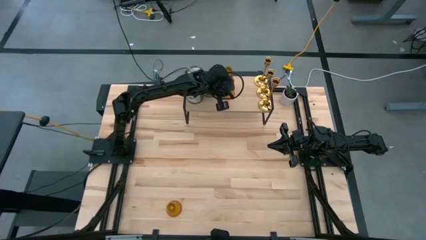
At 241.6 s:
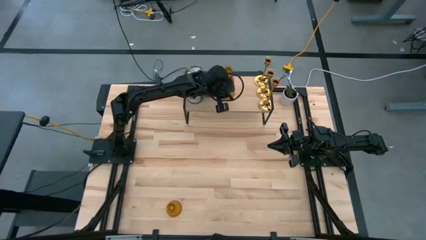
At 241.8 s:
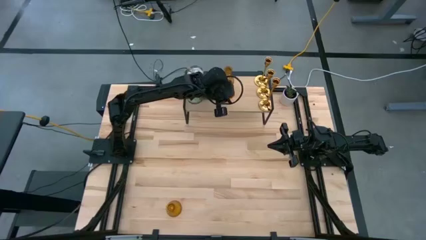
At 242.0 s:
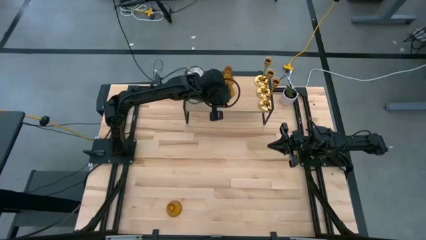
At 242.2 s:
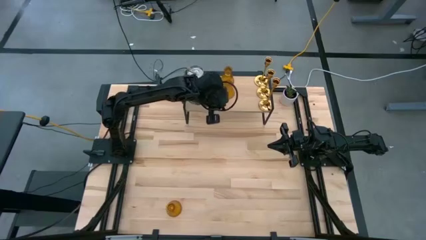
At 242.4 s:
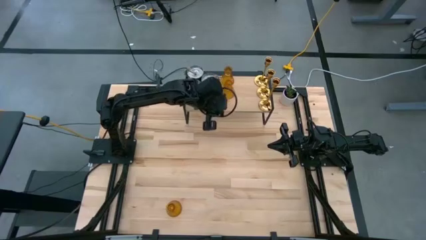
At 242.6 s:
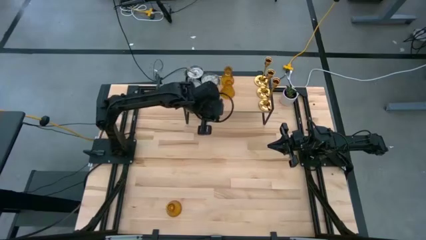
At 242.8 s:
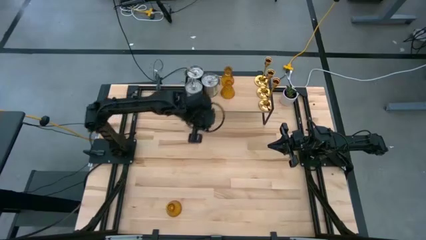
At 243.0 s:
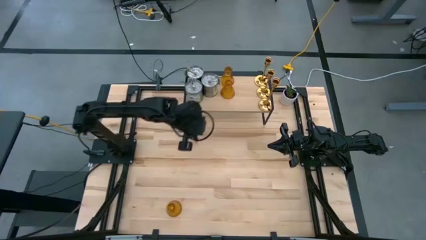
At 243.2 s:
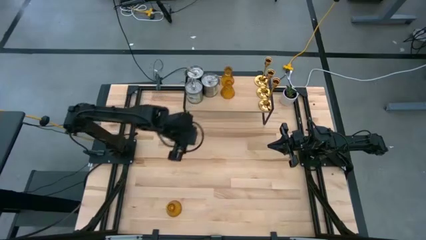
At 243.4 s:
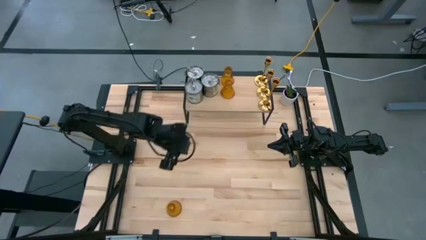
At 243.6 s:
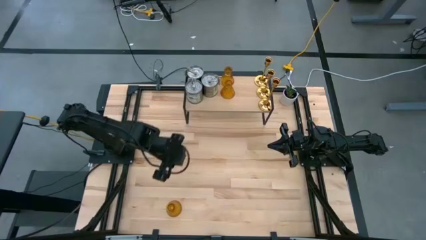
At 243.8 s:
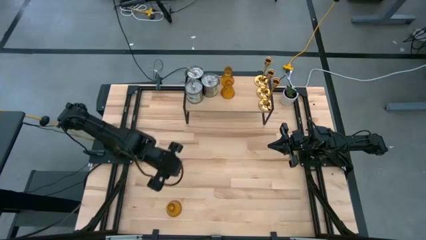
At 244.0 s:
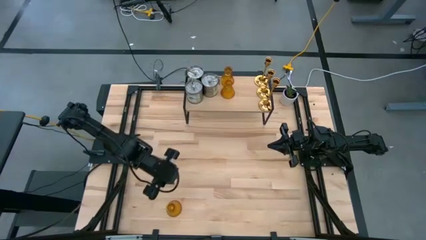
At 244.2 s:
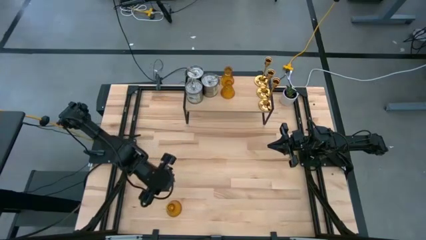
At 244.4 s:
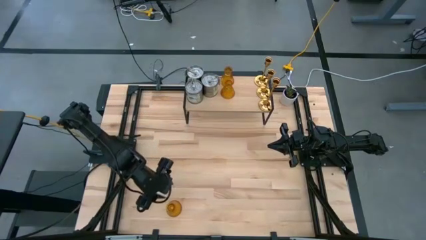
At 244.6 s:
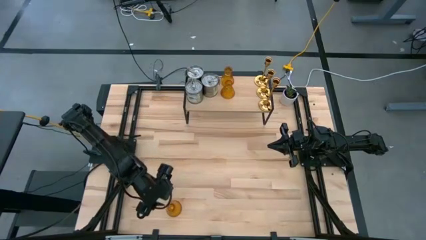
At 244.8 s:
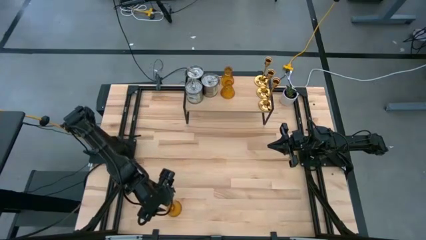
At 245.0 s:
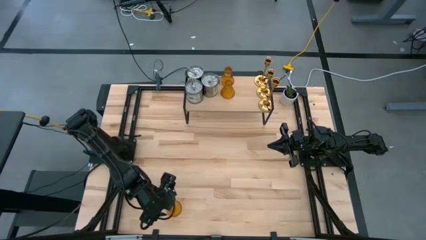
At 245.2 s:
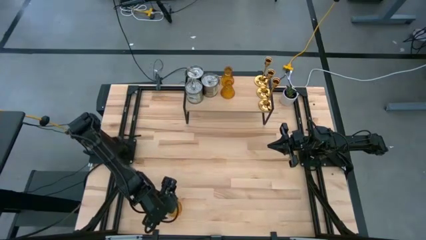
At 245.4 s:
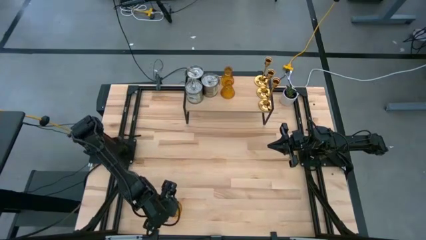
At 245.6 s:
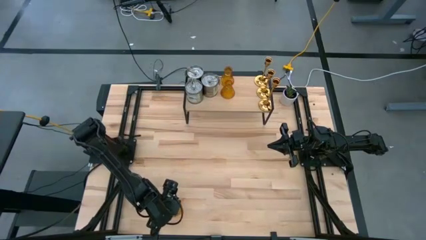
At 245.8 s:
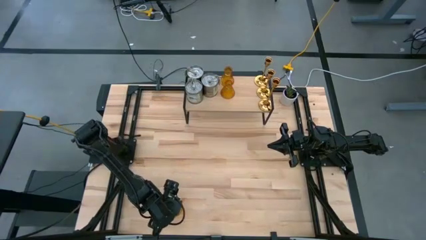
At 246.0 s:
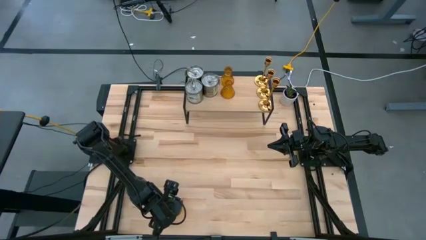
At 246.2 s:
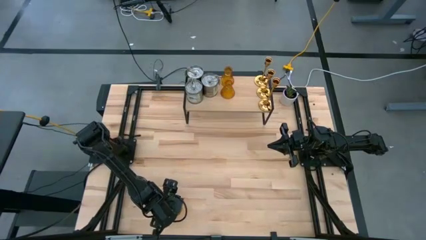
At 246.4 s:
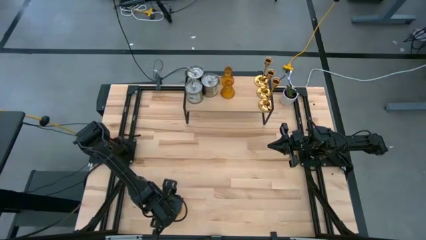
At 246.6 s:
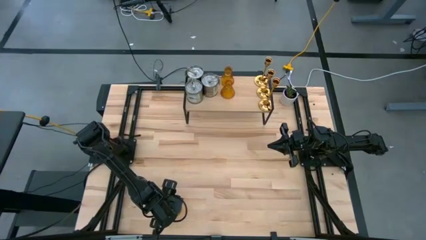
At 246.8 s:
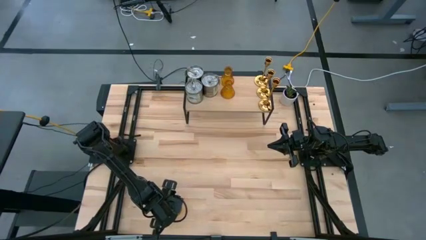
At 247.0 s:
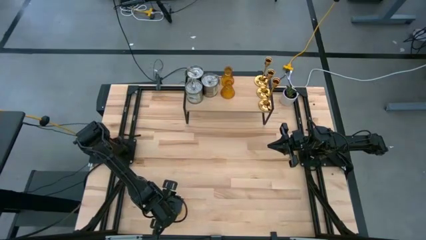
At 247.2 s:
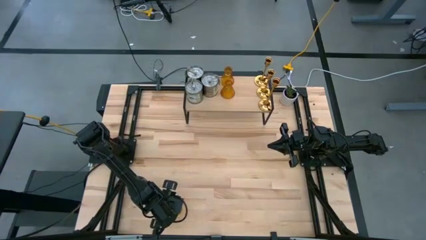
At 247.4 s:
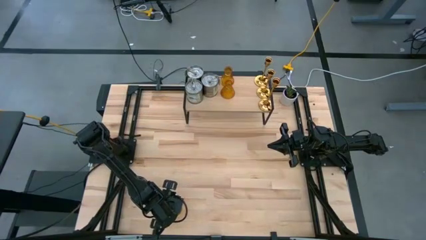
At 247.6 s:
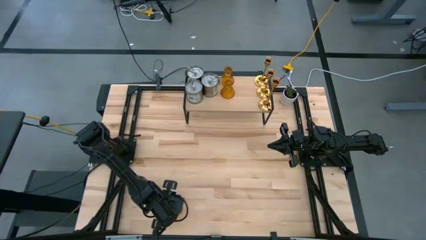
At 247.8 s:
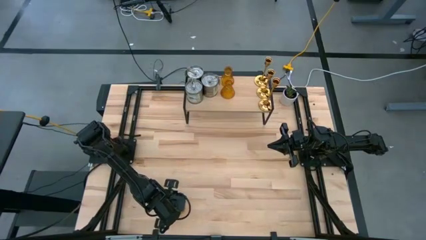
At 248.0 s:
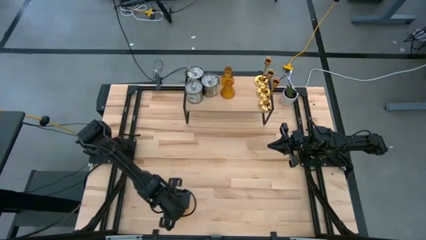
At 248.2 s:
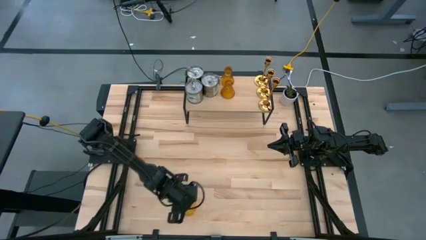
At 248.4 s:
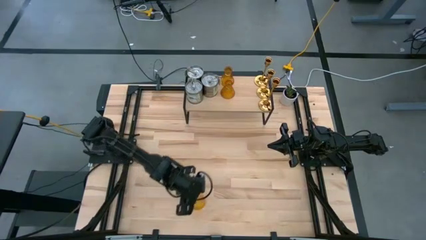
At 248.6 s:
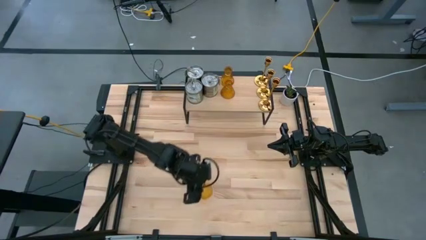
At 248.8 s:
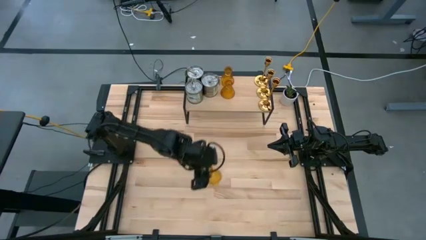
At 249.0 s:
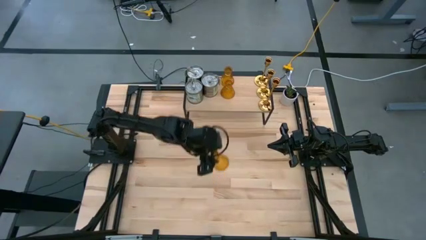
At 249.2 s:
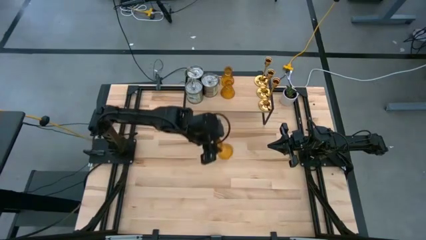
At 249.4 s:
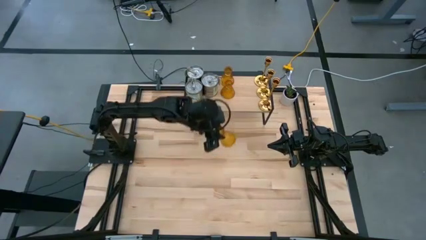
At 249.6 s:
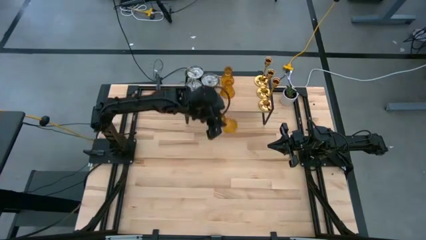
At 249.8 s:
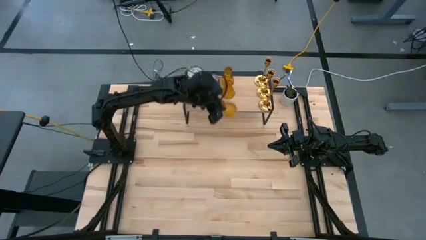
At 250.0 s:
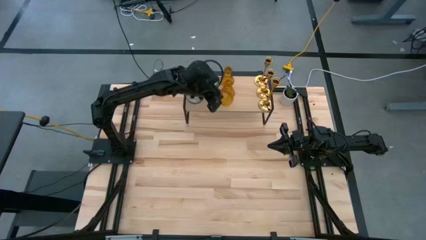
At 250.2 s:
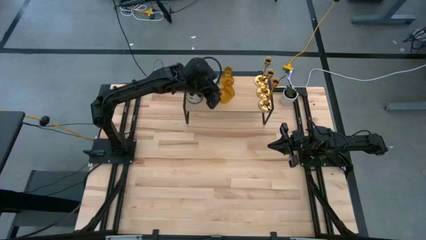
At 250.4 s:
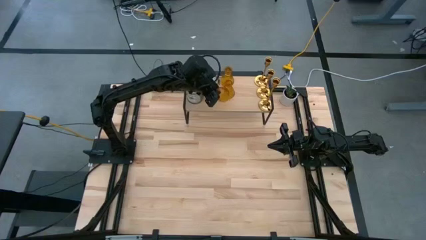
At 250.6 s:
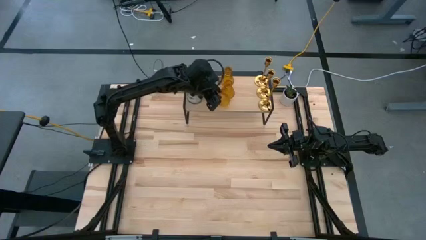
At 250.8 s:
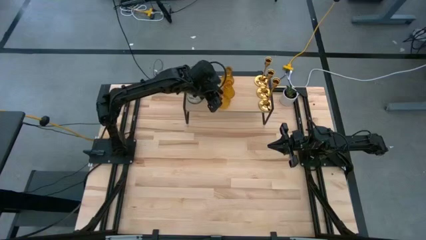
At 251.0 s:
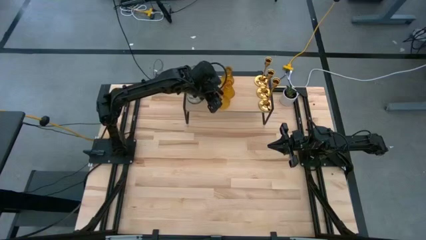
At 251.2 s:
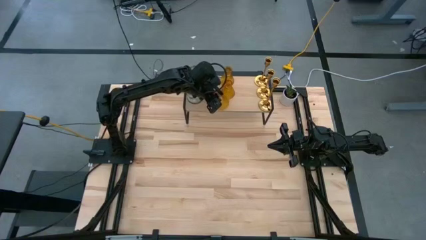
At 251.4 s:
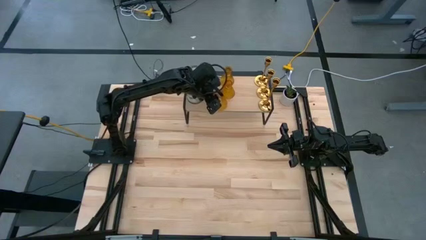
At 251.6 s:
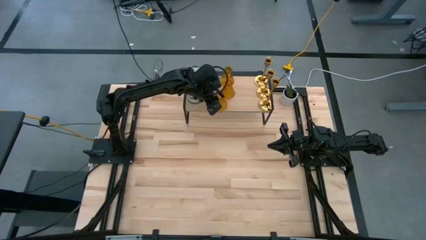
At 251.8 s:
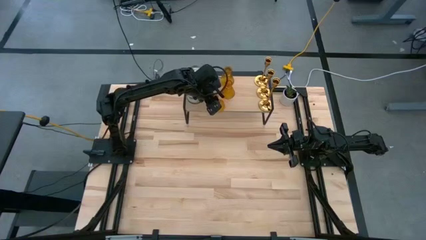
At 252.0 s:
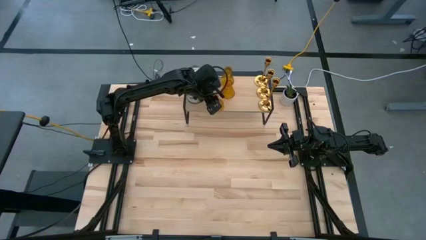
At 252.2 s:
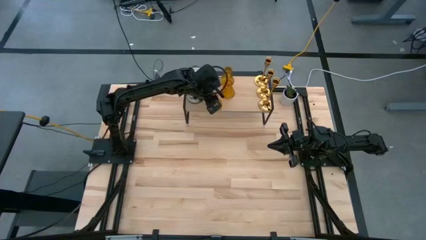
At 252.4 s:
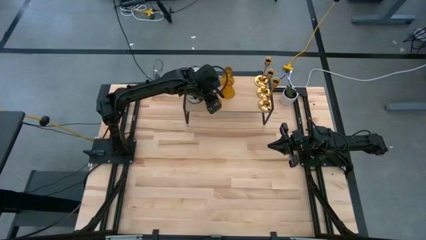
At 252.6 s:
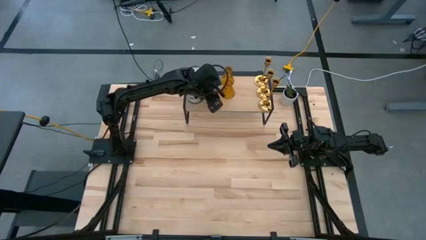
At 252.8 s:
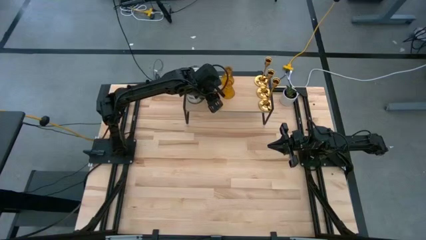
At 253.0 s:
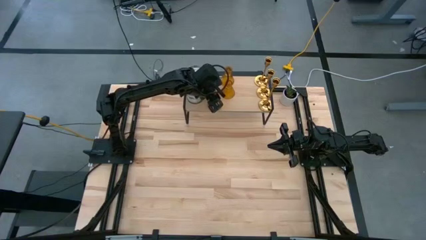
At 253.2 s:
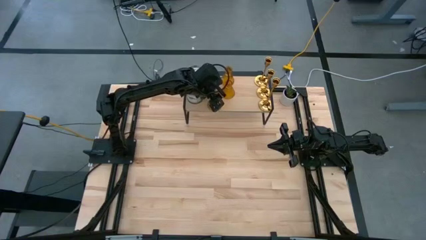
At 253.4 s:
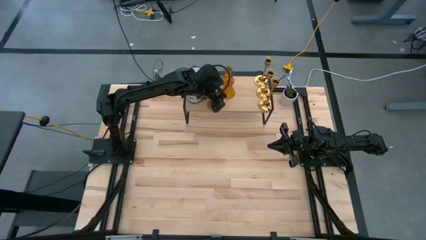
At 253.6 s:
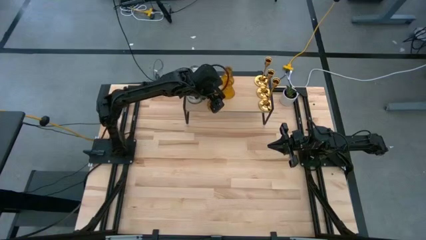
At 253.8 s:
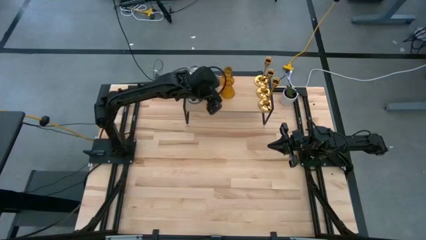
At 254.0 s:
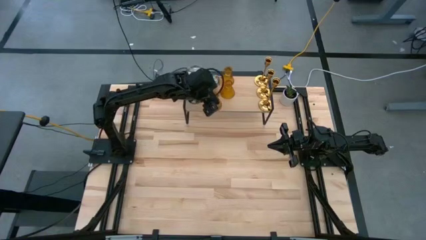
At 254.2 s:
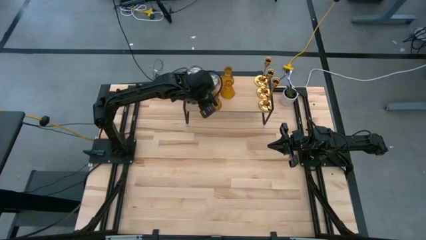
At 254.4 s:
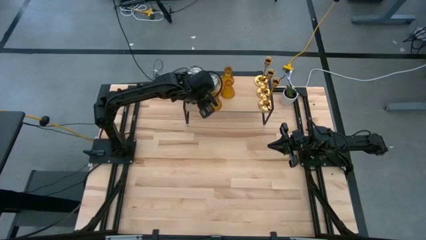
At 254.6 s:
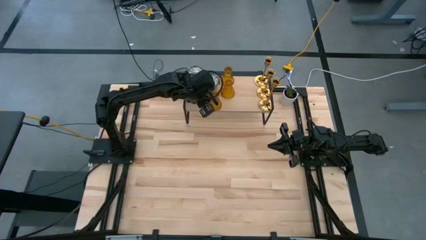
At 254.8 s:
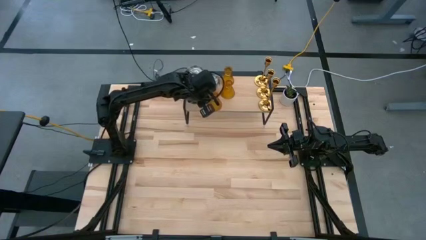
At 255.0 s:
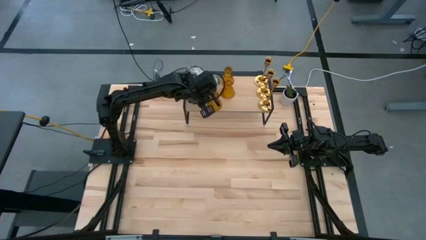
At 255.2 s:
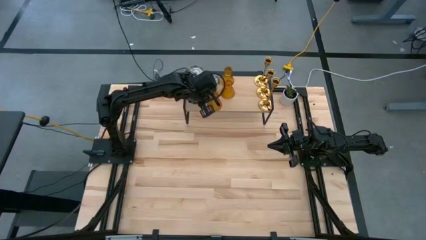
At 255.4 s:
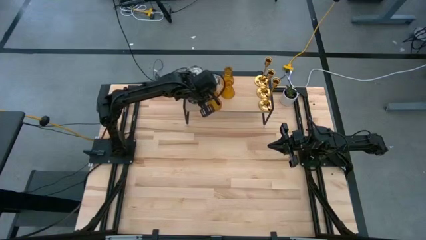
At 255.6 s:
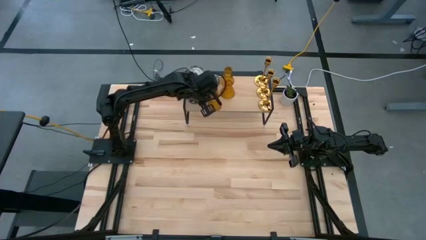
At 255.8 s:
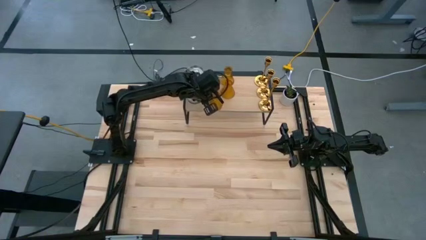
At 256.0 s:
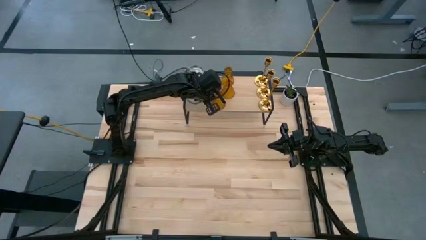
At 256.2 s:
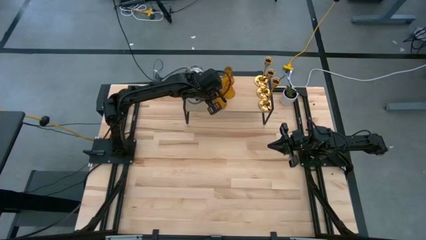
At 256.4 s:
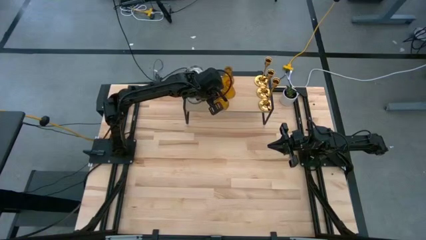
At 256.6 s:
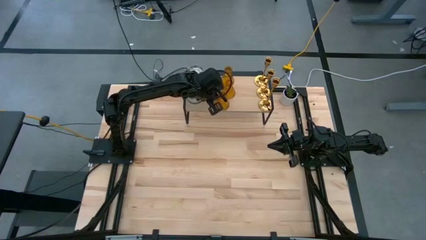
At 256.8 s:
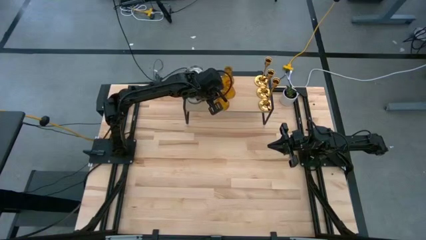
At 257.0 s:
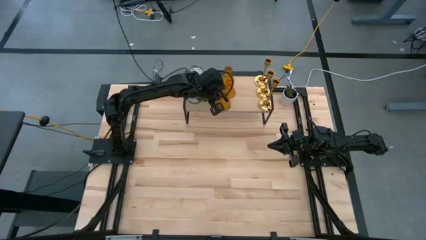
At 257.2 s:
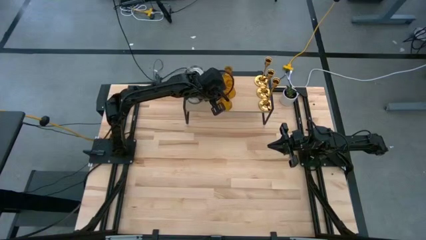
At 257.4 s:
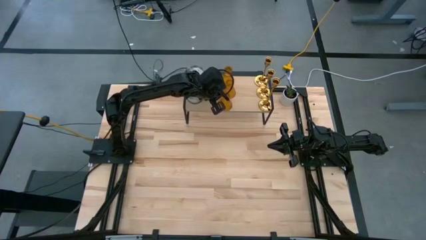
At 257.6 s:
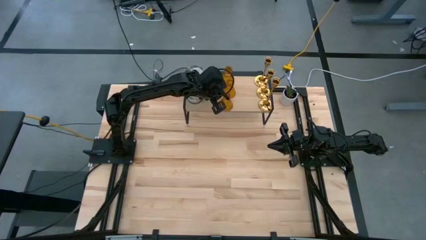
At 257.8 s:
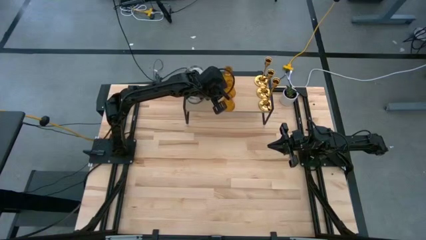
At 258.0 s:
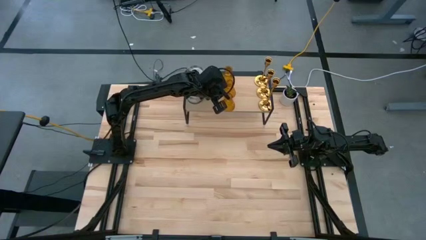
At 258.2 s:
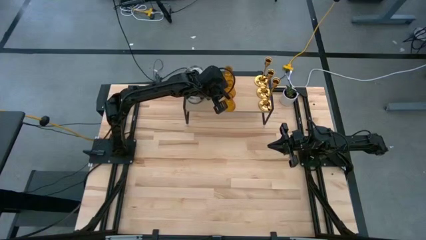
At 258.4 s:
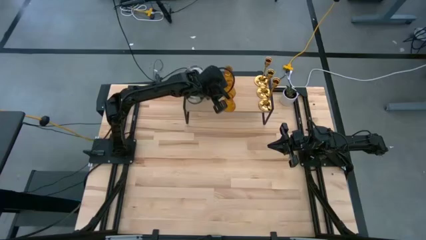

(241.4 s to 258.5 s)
Task: Pick & Place candle stick holders
Put the orange glass candle holder on the shelf aligned with the other orange glass candle holders
